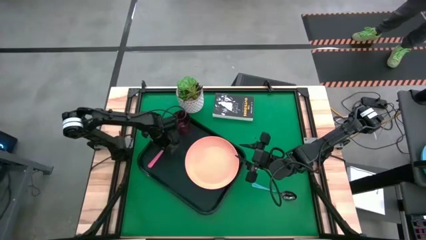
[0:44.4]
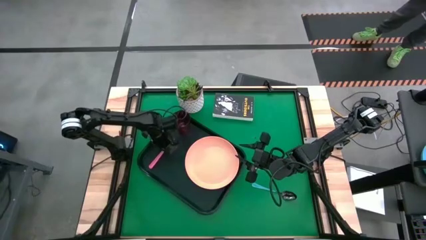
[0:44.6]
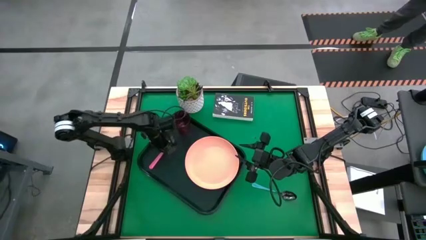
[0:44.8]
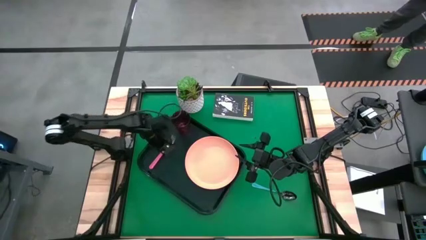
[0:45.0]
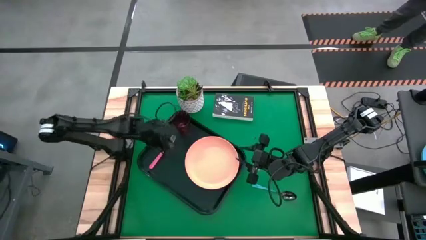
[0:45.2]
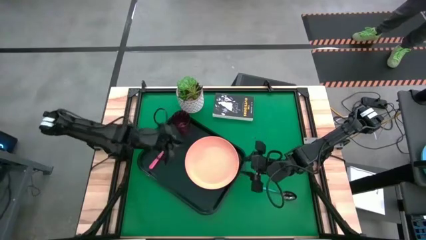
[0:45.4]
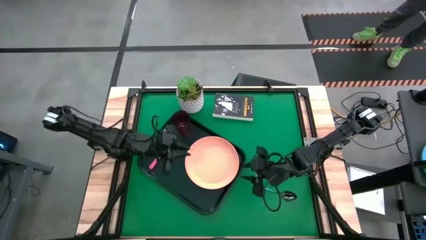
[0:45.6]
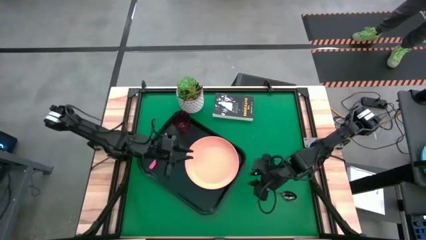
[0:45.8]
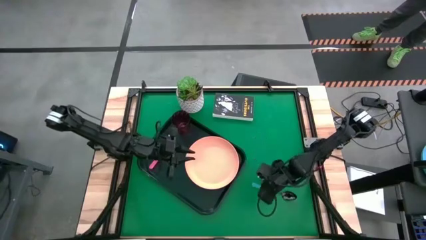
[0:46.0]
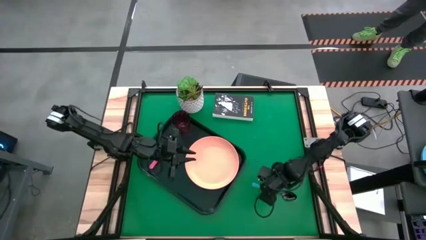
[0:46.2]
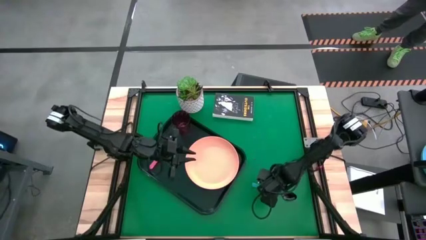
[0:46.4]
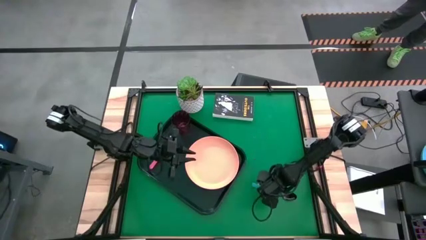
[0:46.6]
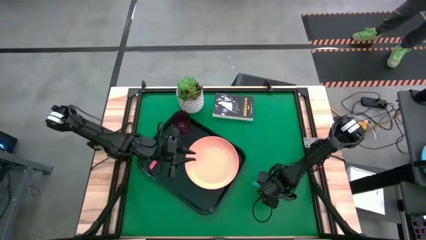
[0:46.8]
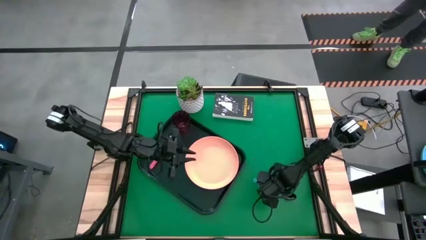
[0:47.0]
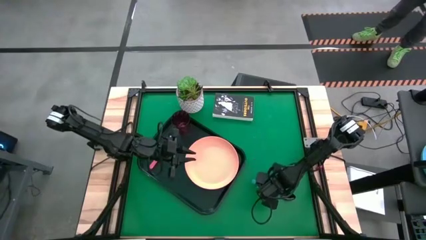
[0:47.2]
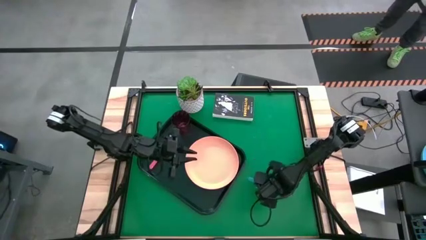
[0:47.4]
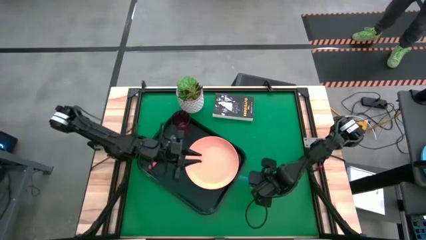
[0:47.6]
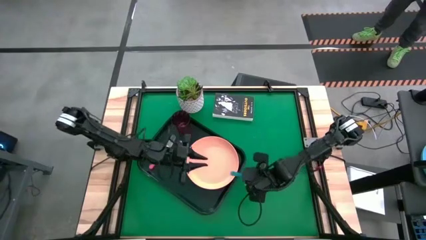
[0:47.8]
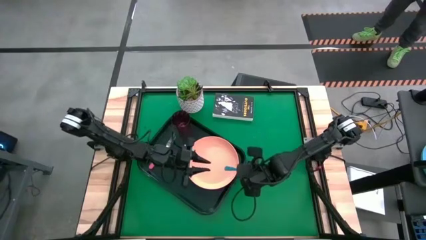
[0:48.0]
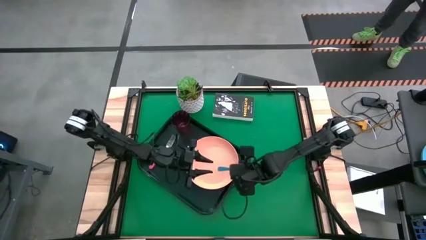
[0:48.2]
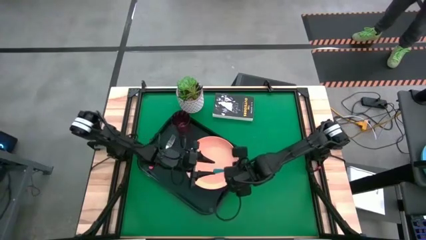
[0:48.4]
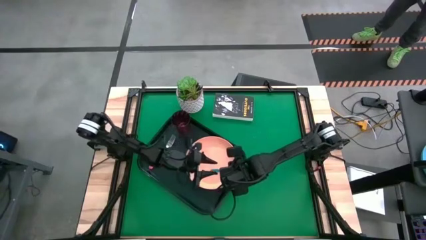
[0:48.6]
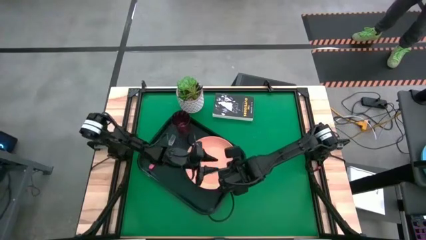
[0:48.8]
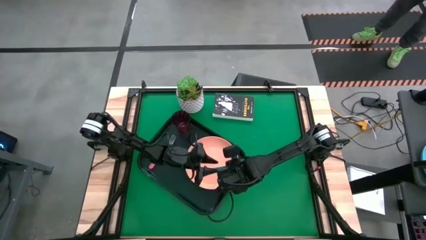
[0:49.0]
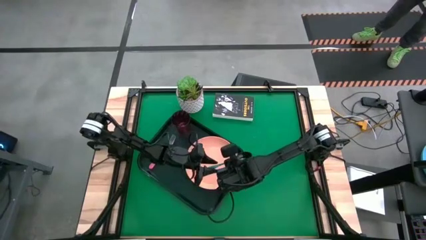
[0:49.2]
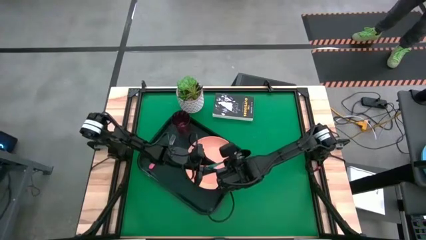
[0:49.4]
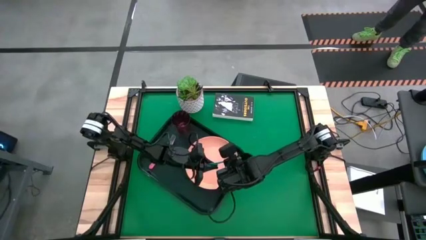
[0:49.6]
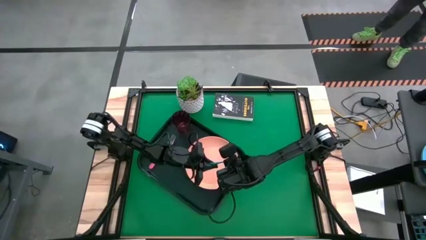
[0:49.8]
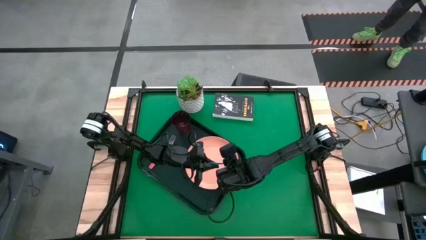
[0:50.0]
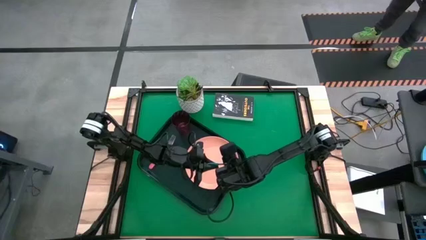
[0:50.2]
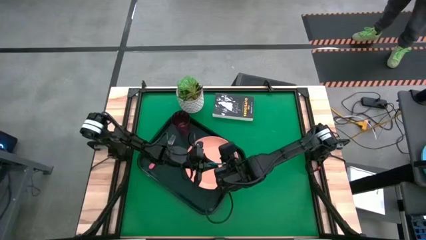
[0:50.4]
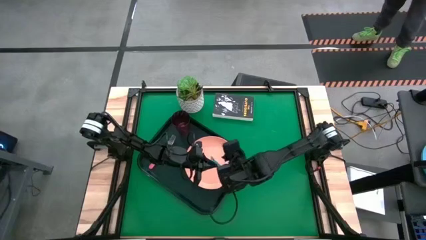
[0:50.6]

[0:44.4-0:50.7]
Task: Pick and place plate/cup/fork/spoon on tray
Put the blue spoon on the black tray to the right of the pink fork

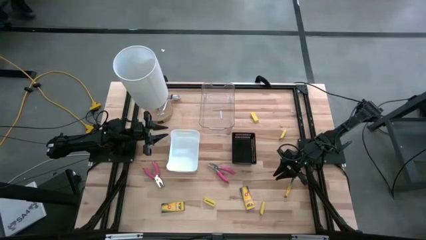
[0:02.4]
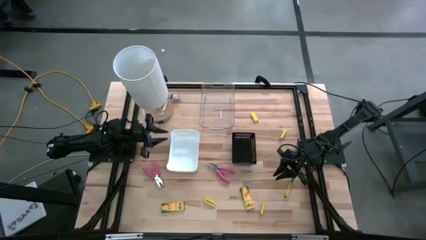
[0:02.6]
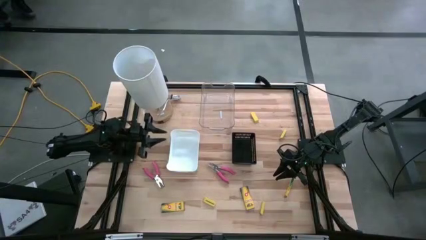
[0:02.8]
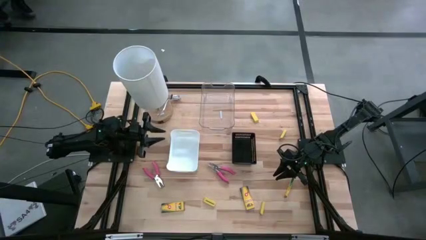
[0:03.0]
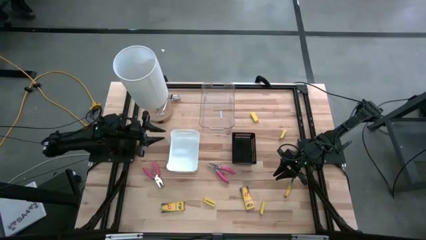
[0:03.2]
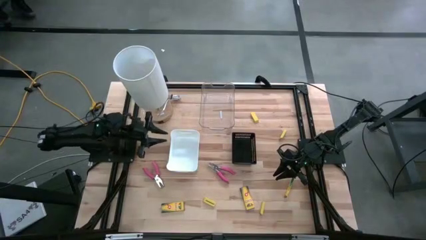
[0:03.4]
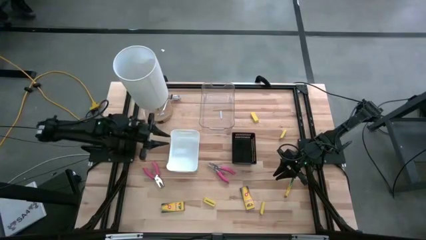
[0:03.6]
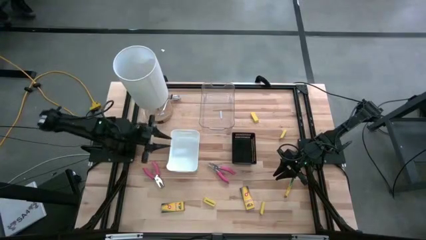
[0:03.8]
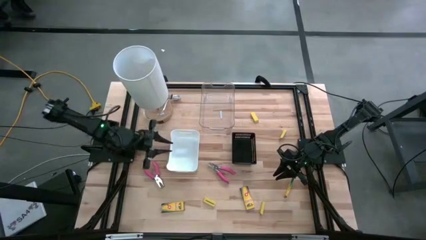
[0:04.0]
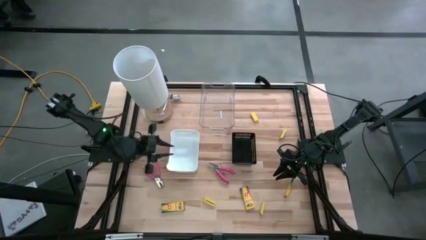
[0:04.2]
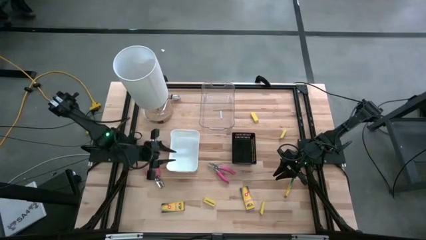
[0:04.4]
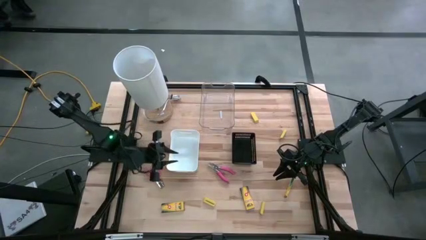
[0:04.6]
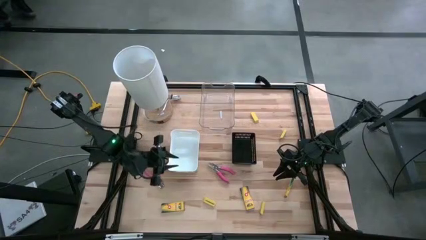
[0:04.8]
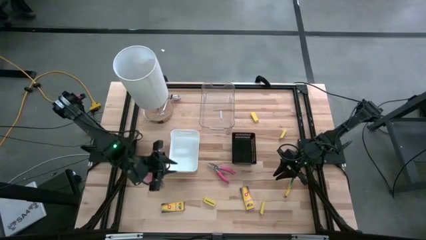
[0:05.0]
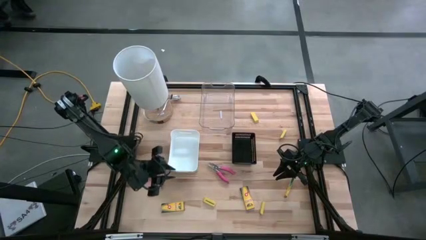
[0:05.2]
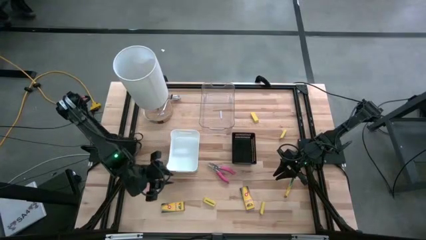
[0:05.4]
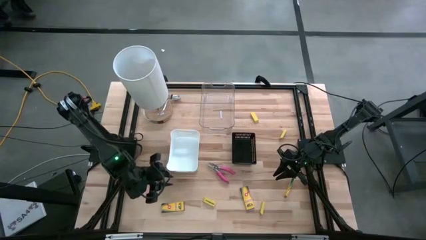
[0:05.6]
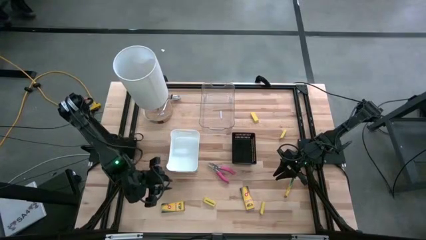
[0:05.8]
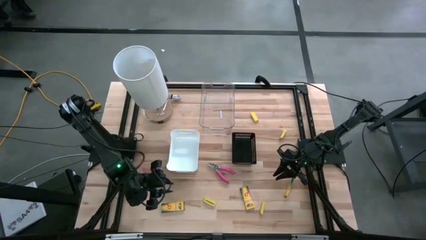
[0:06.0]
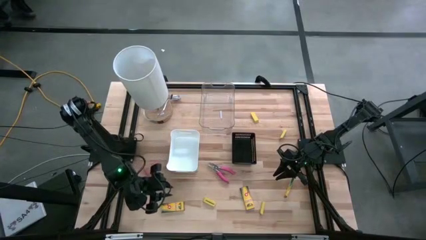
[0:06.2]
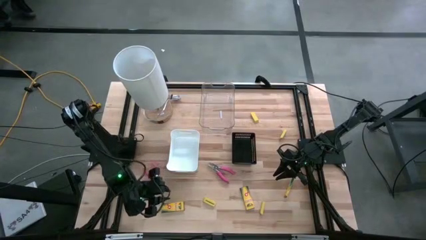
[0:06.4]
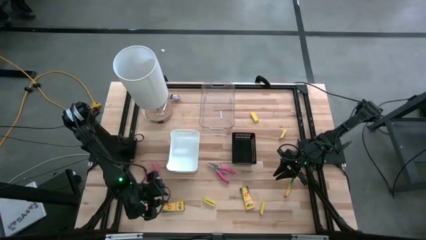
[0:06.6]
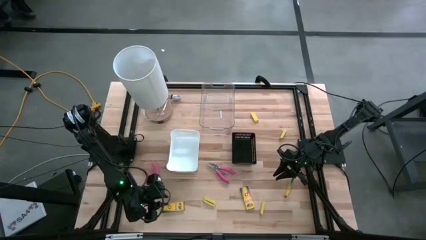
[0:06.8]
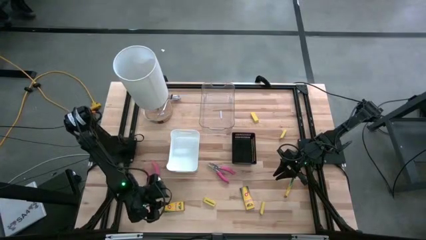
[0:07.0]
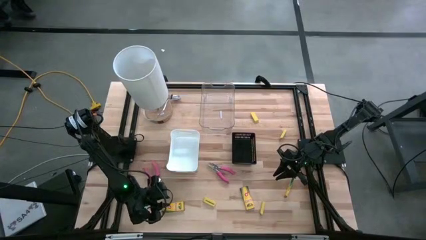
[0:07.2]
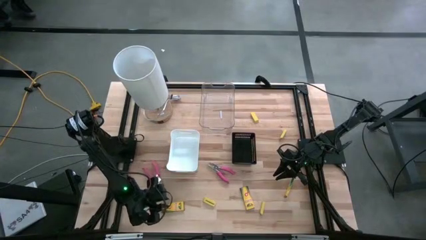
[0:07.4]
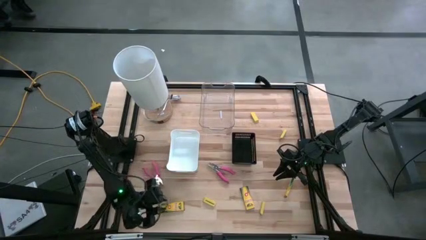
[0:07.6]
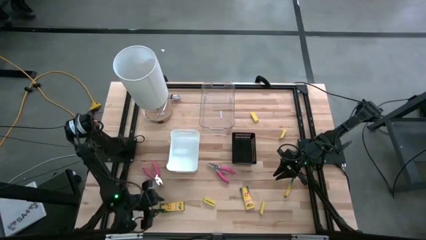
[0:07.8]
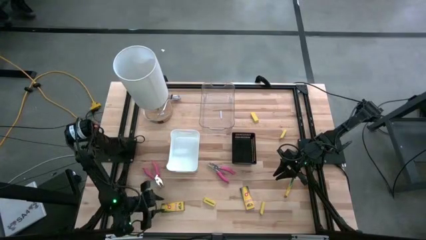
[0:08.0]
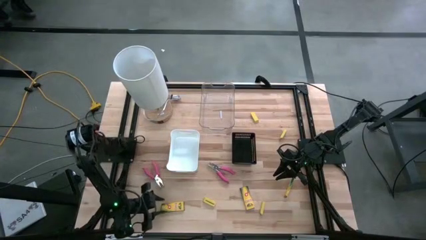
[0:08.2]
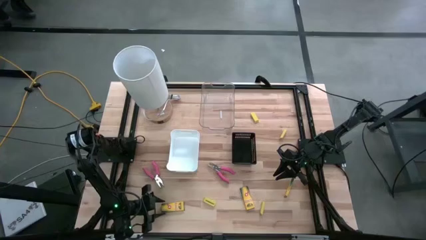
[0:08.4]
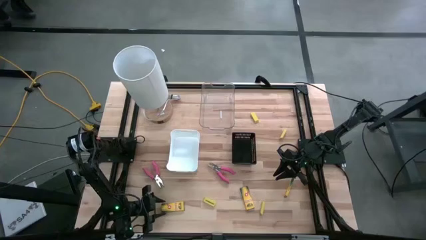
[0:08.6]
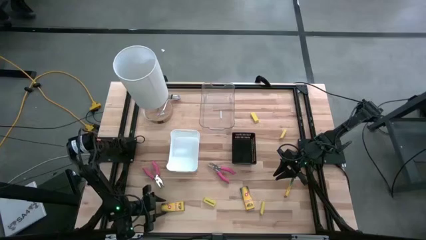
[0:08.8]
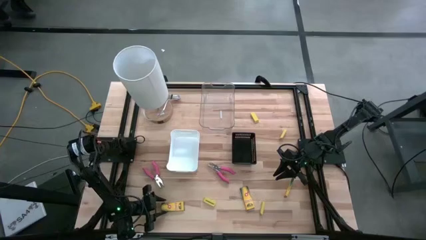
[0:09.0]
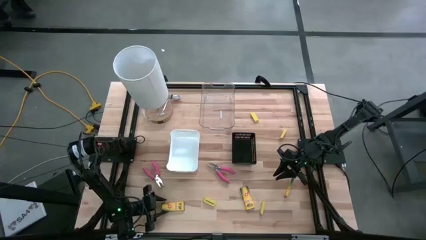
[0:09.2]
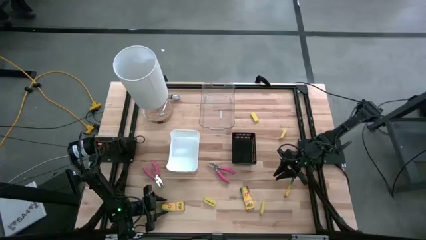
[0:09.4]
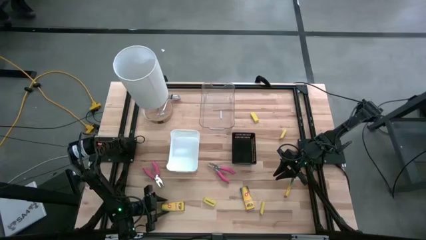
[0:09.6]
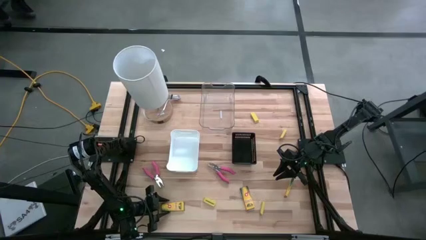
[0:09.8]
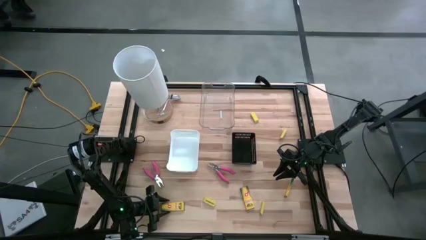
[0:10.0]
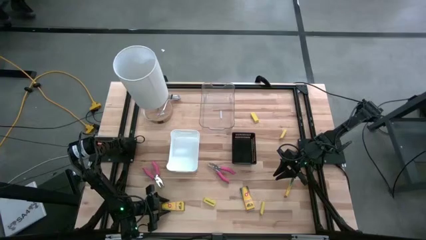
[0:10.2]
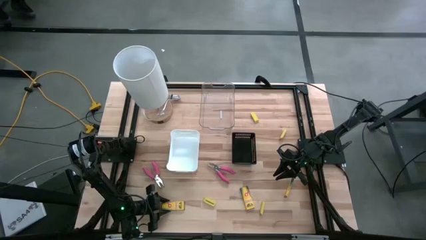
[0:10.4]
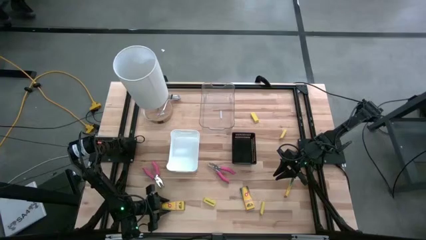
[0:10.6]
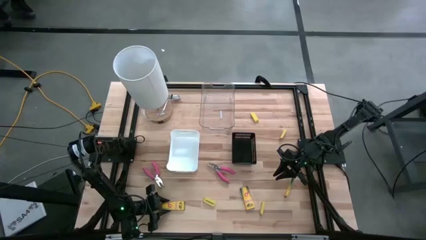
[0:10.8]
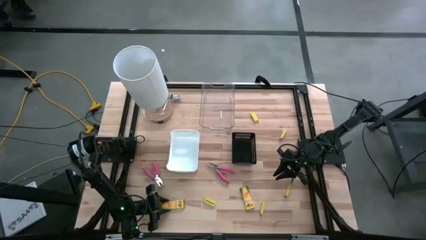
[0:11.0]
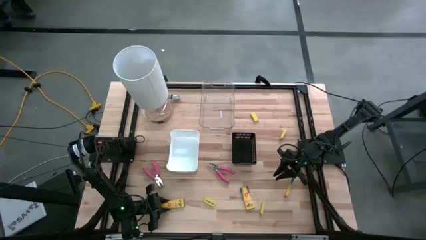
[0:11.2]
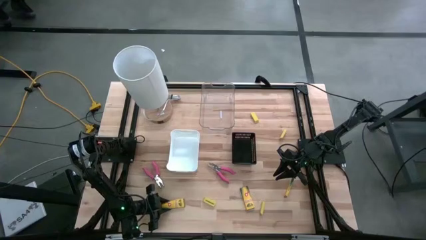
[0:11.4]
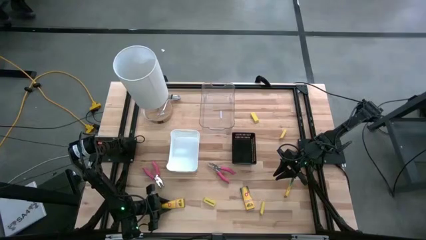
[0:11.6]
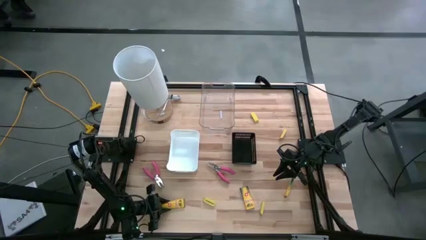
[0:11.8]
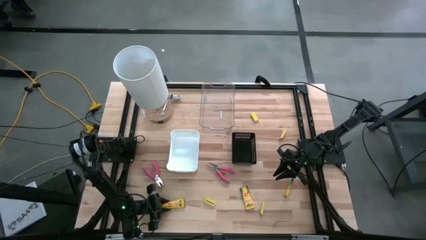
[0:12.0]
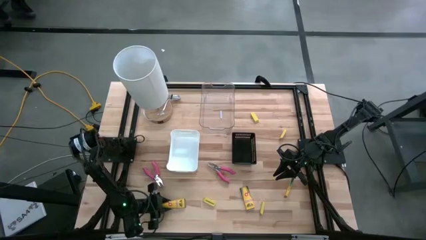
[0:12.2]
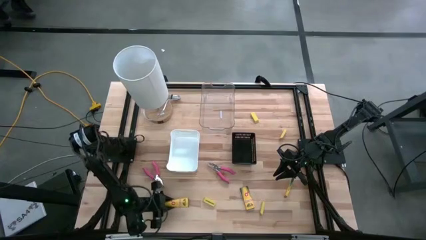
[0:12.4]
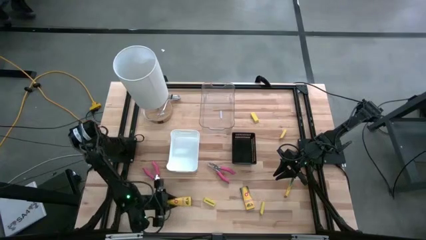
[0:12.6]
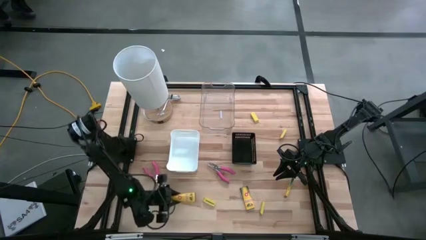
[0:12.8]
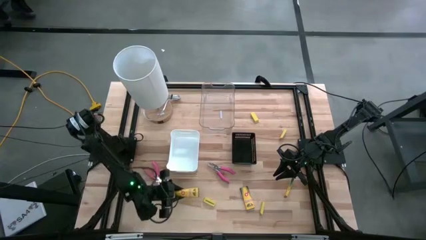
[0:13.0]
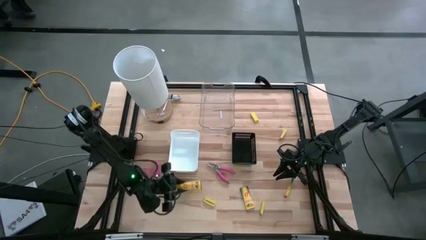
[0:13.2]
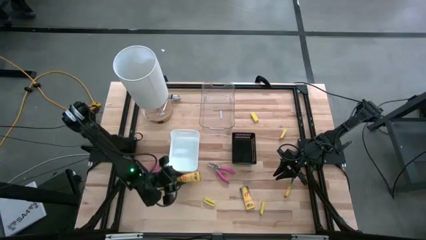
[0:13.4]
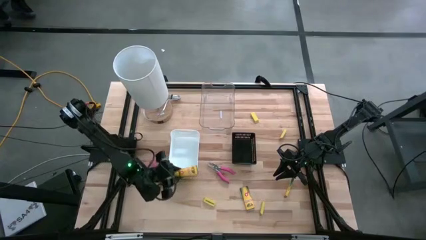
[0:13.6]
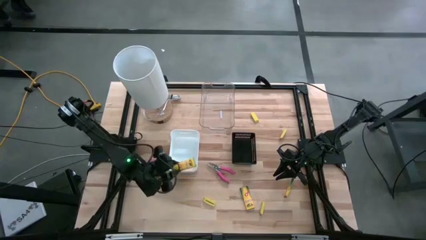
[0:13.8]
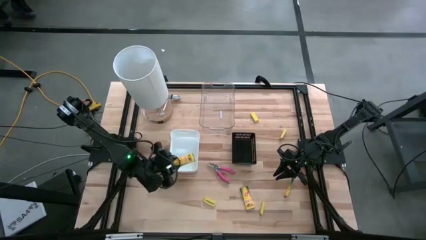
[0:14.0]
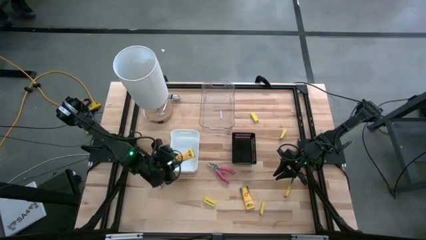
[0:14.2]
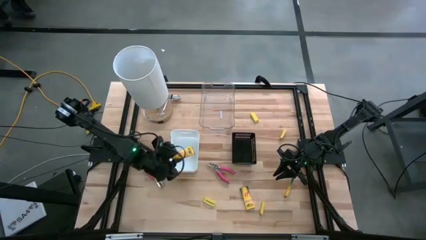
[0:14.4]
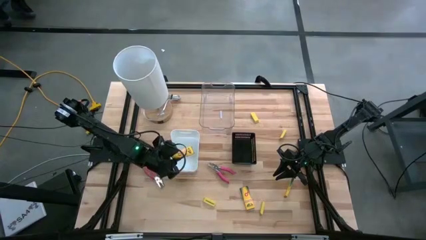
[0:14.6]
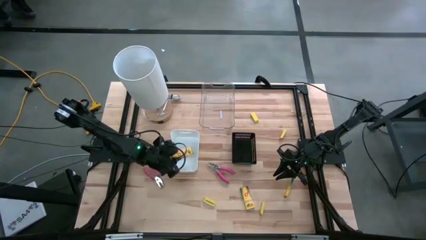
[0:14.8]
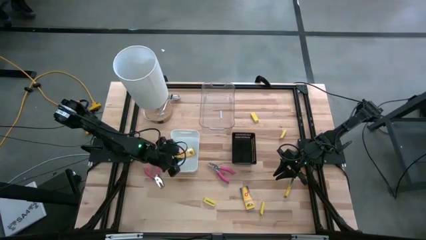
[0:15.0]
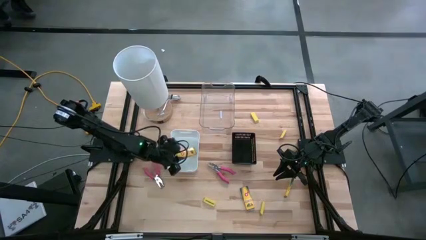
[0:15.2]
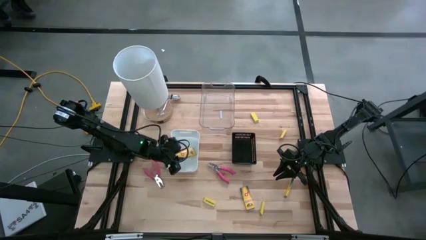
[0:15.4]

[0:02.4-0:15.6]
Task: Pick & Place School Supplies
Put the left box of crayon into the white bin
